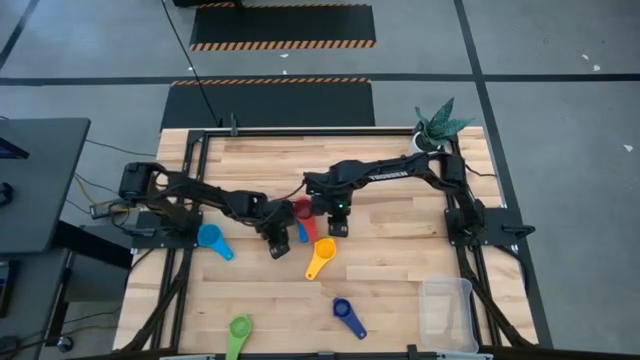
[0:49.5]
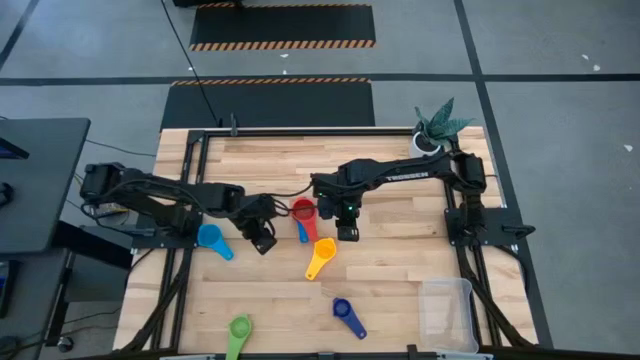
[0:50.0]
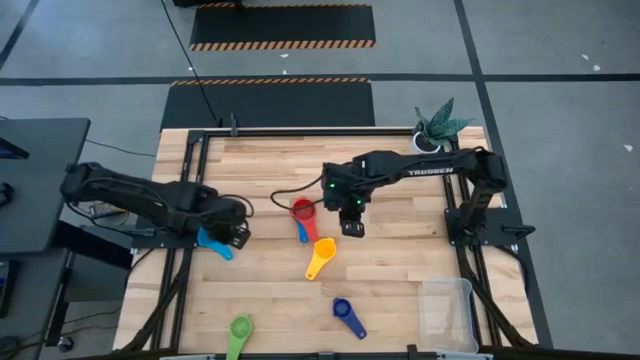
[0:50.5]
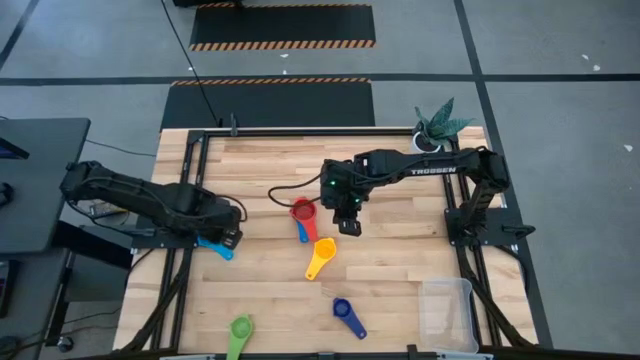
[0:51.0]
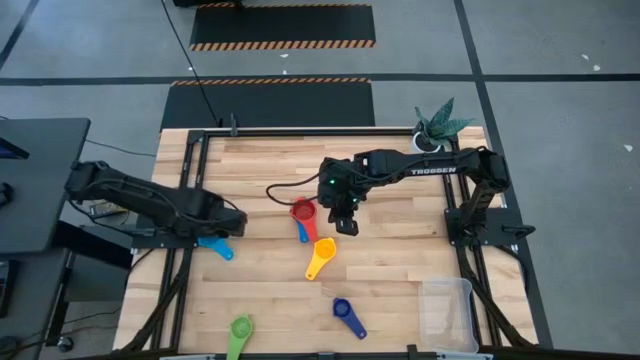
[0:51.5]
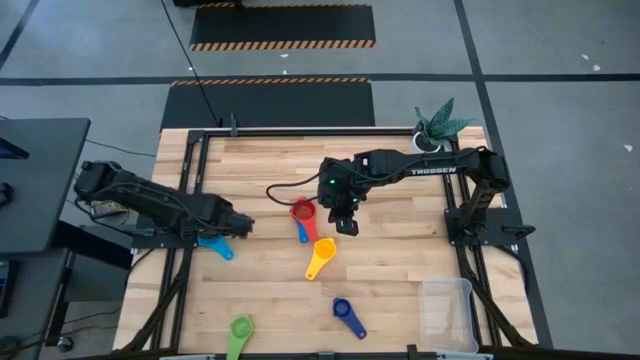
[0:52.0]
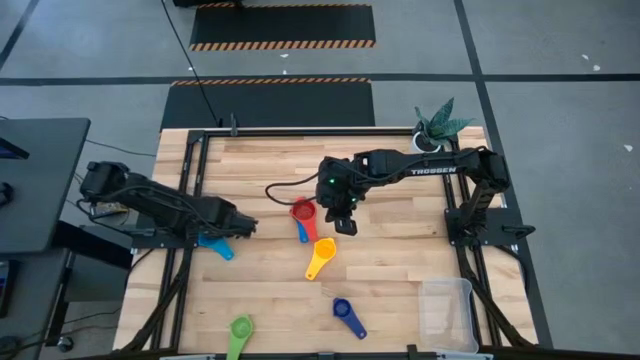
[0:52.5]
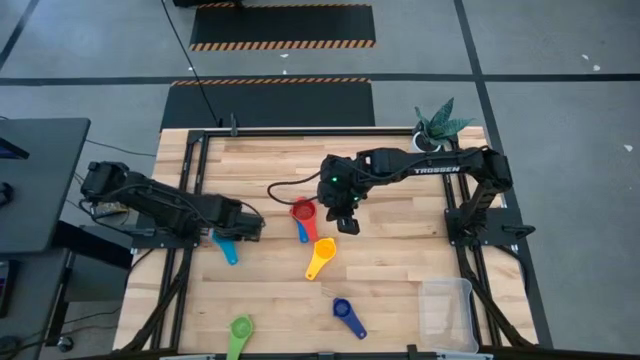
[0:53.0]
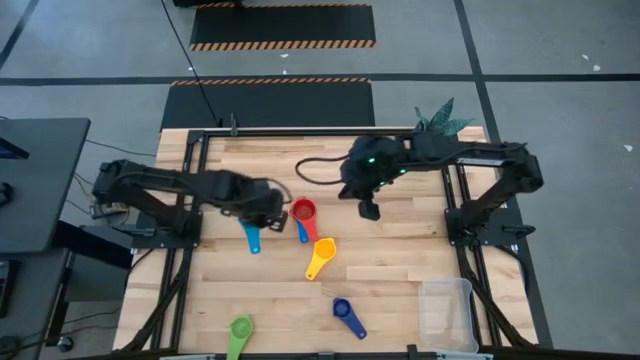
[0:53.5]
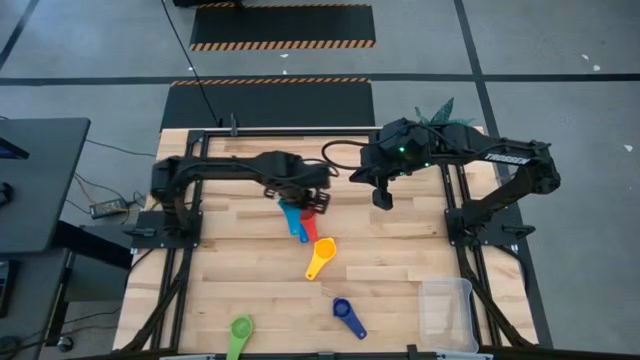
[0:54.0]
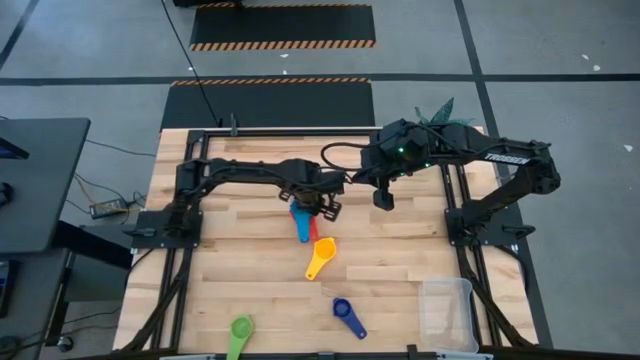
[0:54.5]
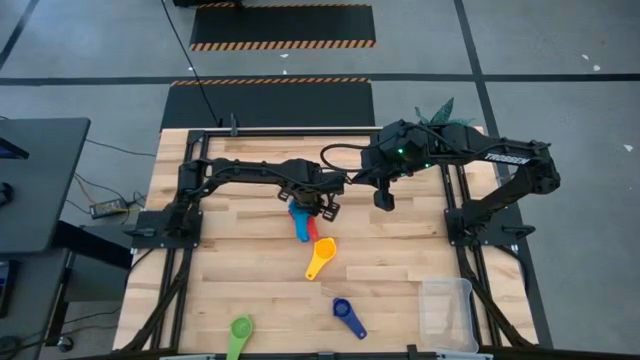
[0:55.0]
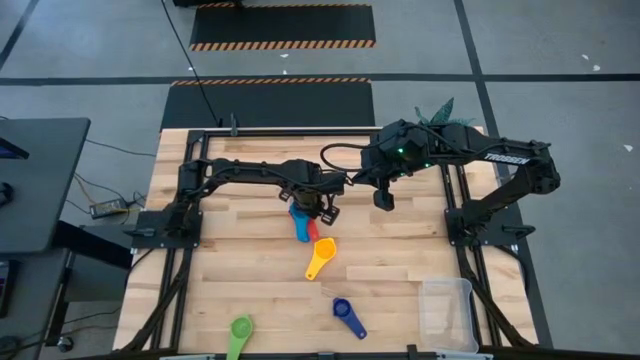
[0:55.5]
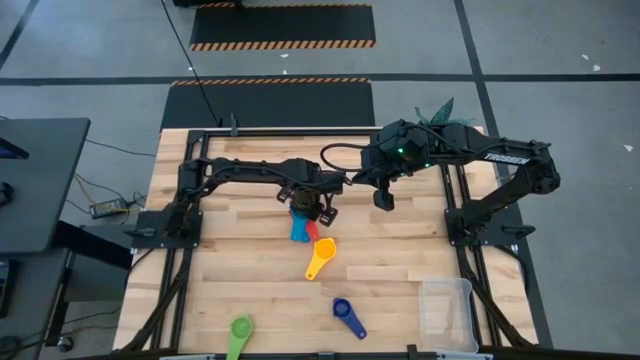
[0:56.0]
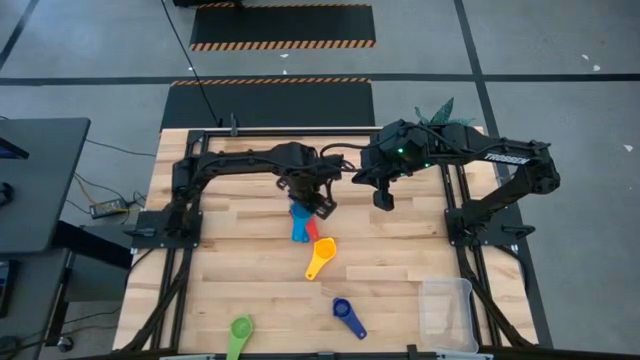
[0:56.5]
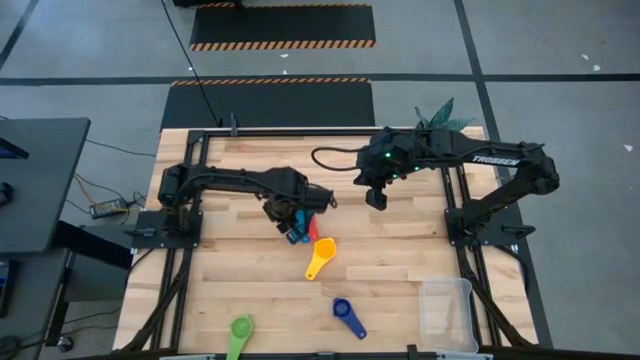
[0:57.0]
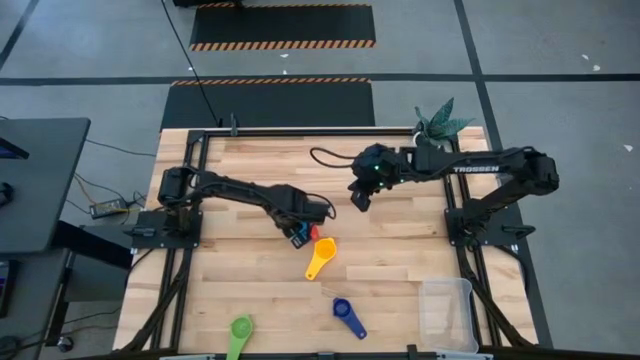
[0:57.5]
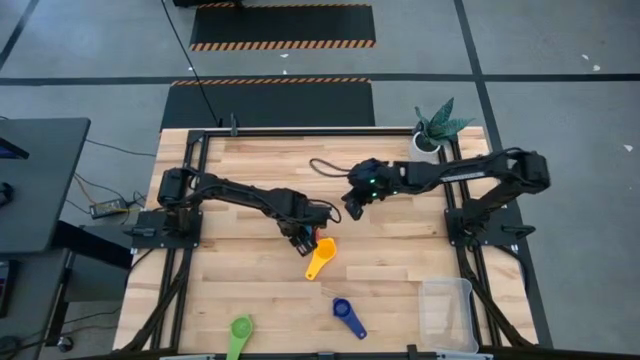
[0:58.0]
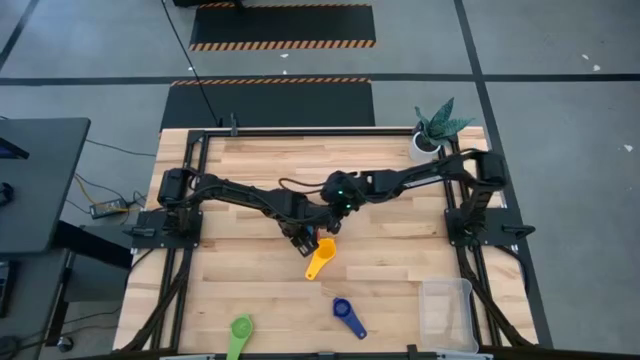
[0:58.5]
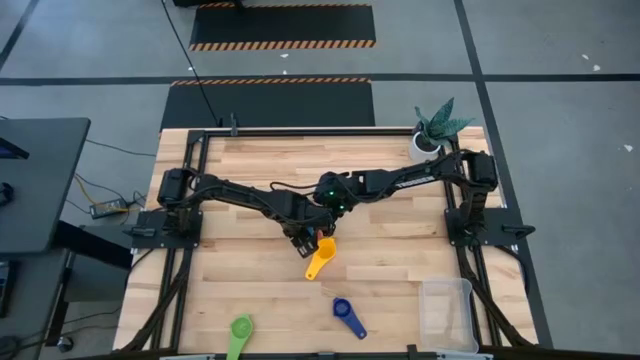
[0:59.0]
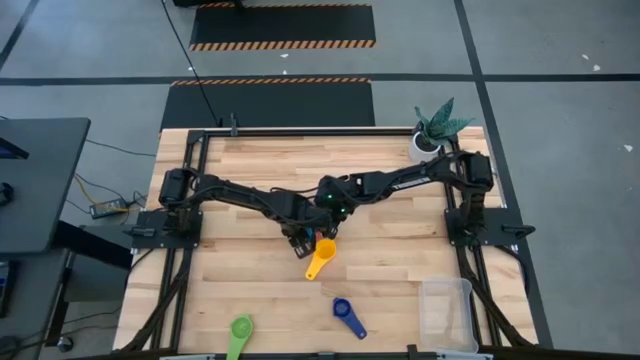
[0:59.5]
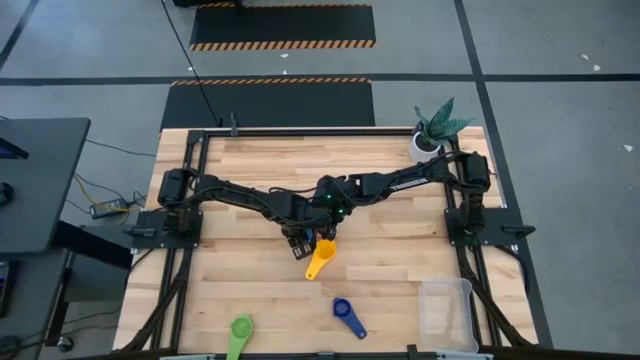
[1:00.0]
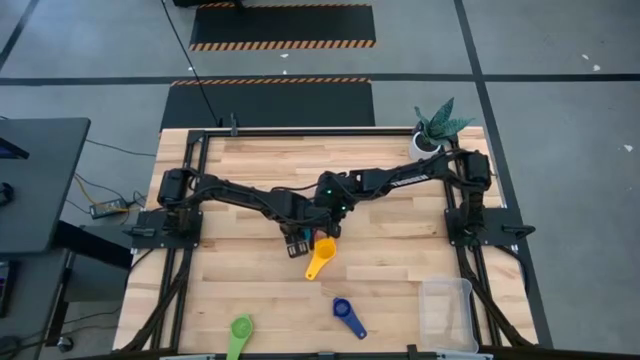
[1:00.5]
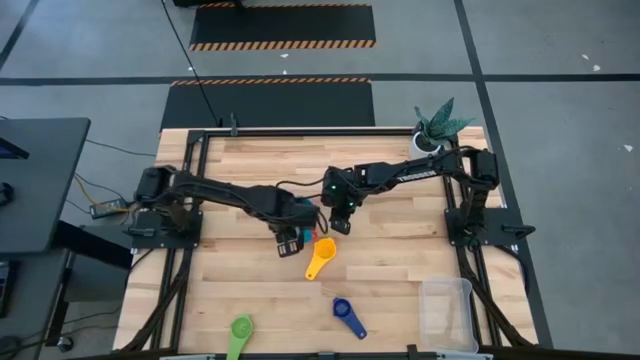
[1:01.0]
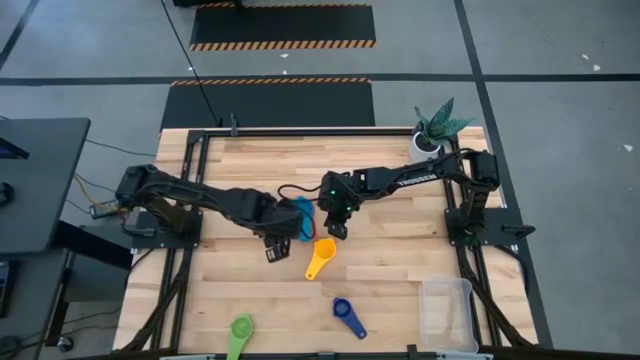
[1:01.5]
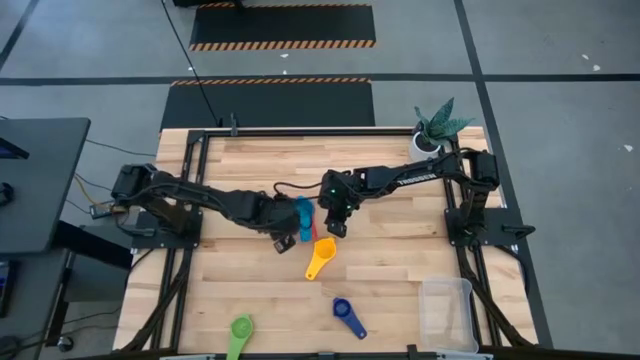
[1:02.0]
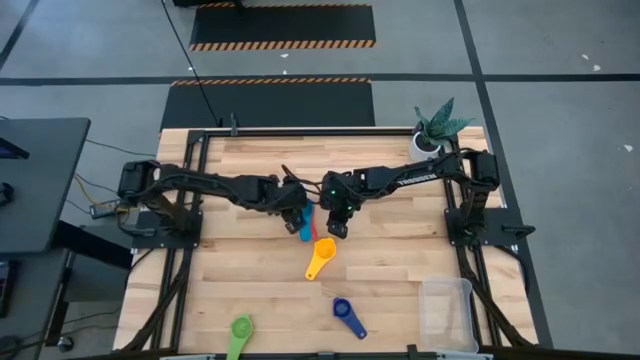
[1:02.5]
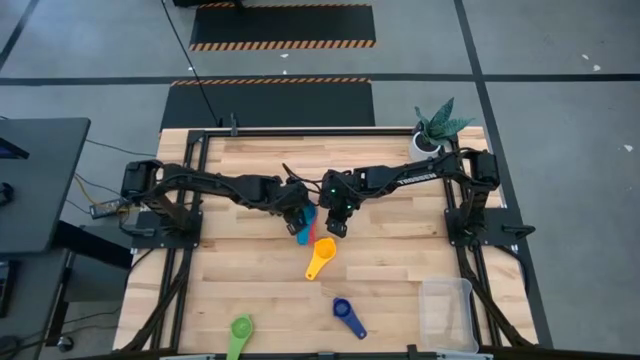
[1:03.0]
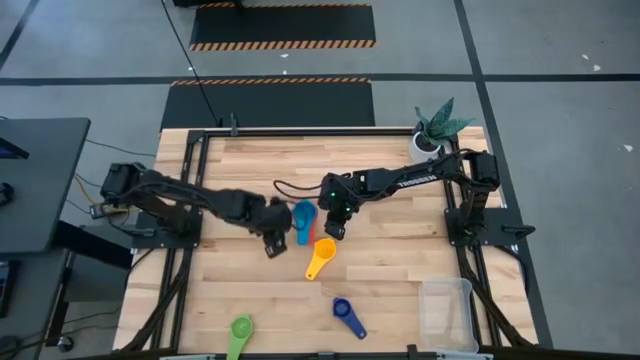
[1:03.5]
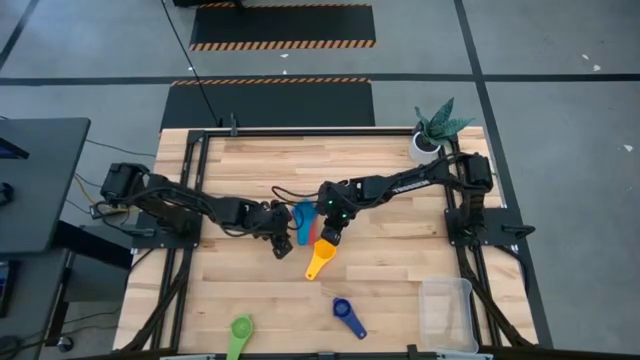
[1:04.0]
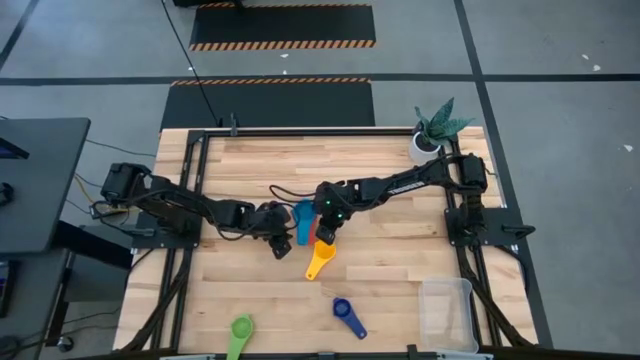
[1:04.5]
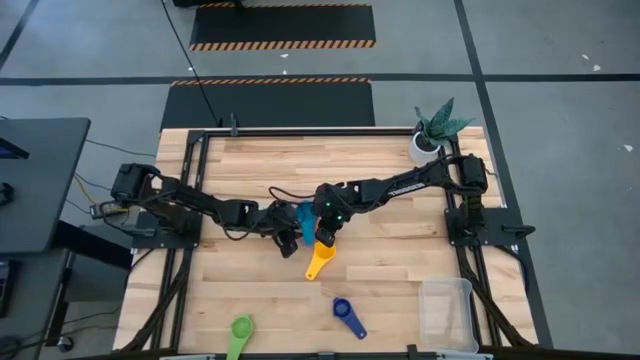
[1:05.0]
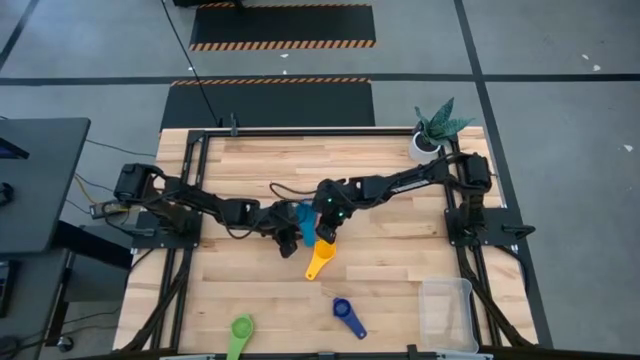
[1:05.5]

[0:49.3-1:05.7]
Task: Nest measuring cups in basket
Stack the light blue measuring cup on top of the red measuring cup

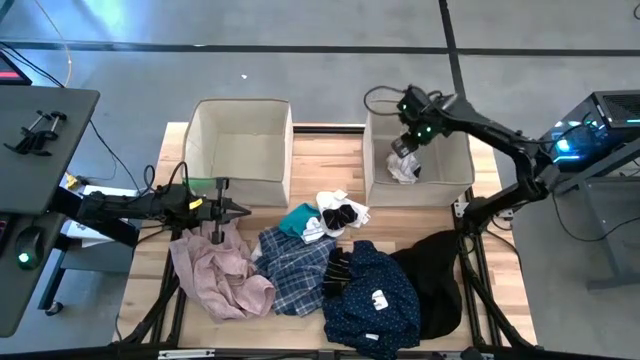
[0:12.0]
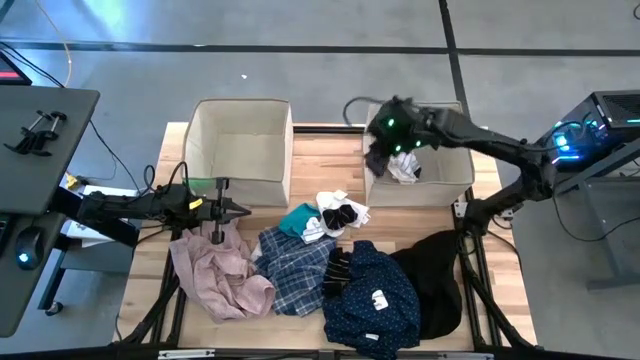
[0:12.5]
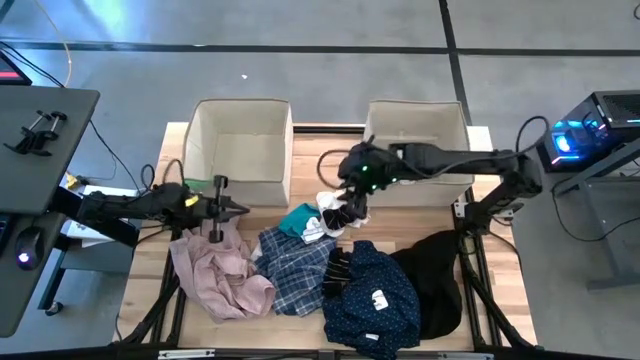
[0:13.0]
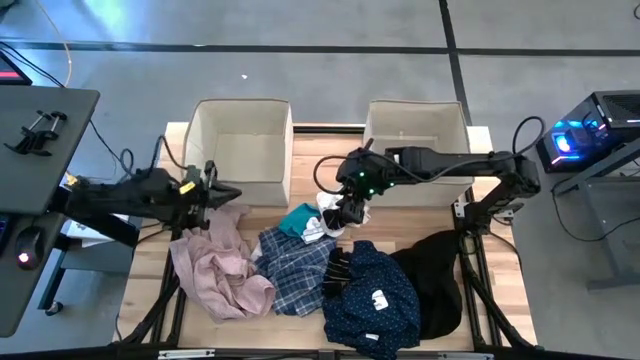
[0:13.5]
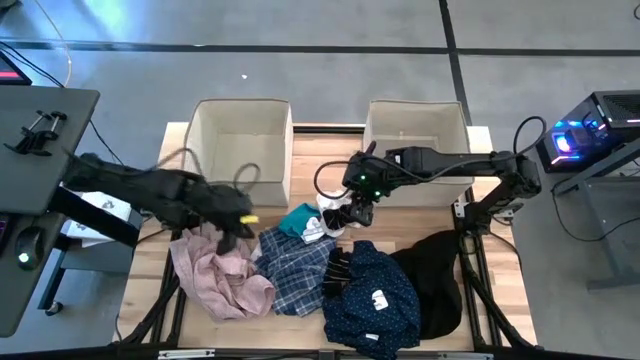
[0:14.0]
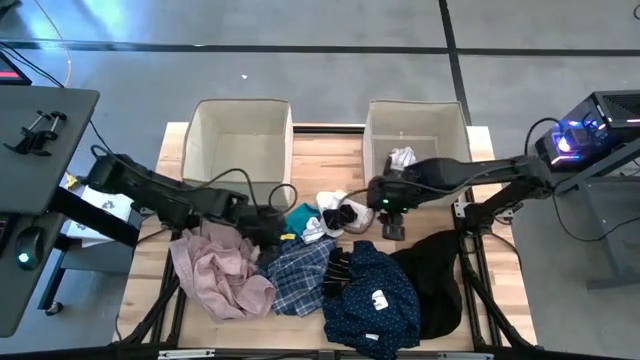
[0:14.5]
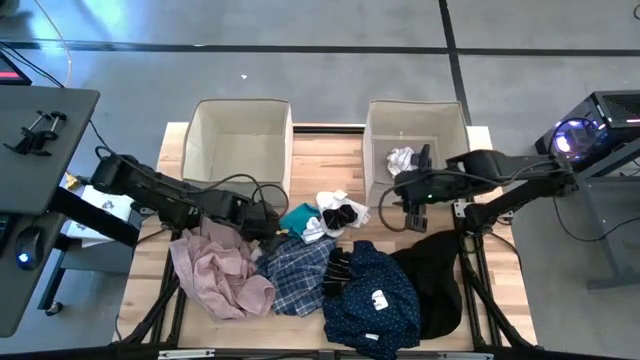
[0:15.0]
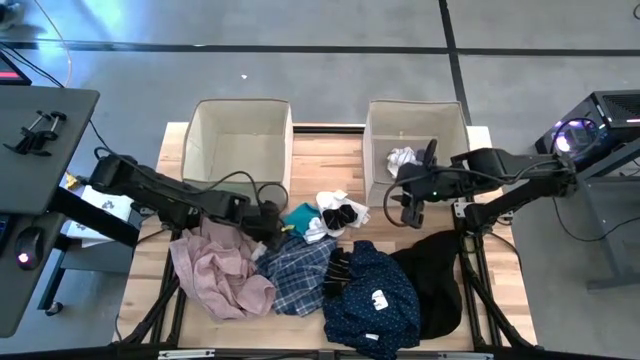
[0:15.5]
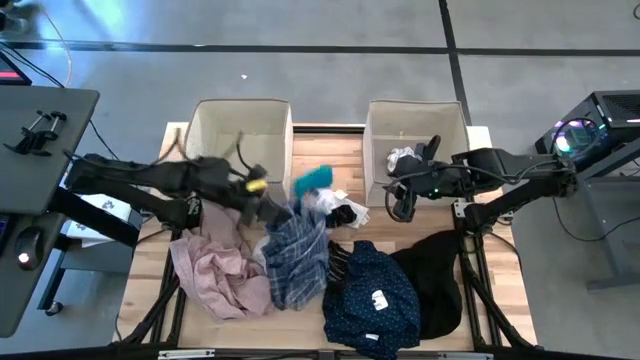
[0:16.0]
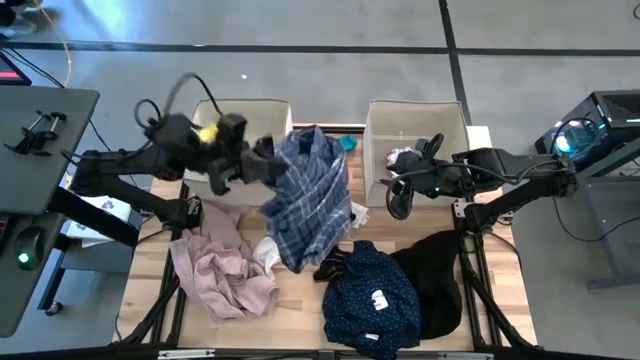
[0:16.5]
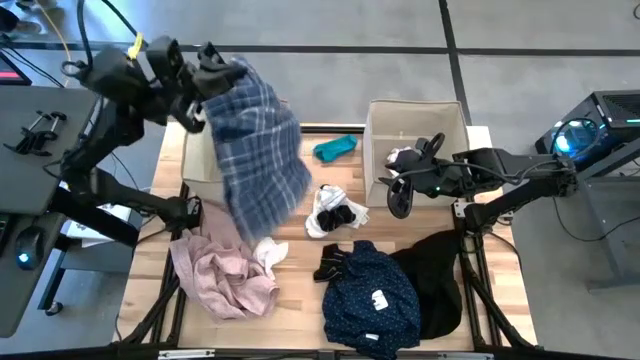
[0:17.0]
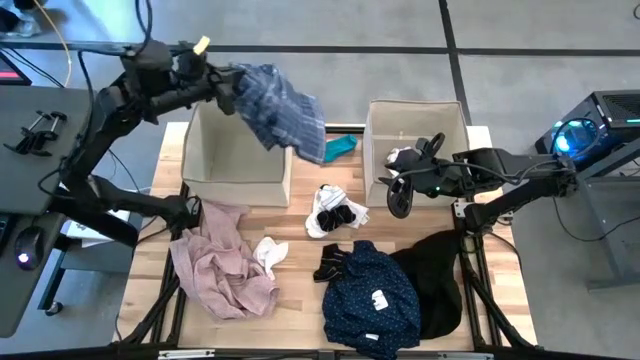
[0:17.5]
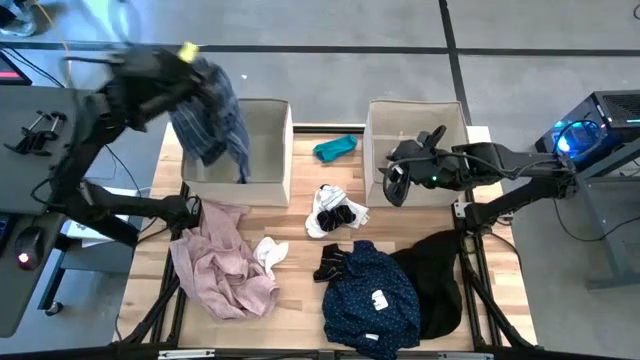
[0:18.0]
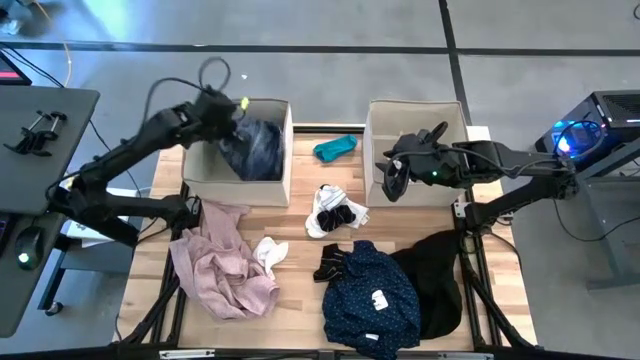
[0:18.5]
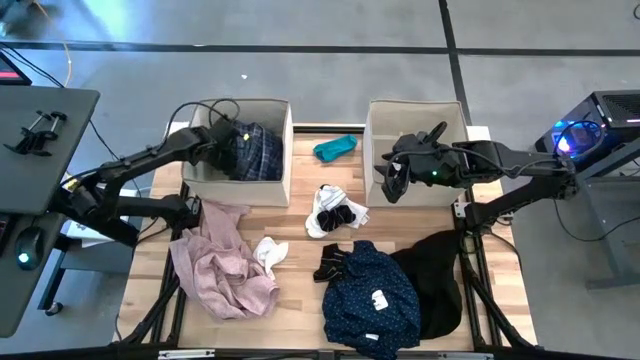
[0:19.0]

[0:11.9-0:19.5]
Task: Sort clothes
Put the dull blue striped cloth into the left laundry organizer
